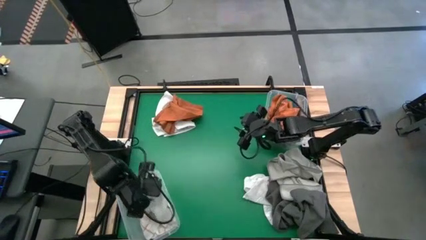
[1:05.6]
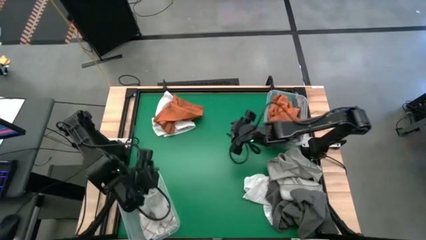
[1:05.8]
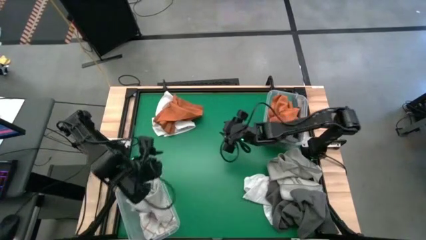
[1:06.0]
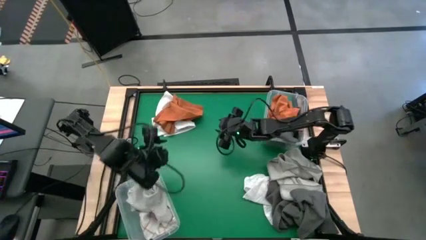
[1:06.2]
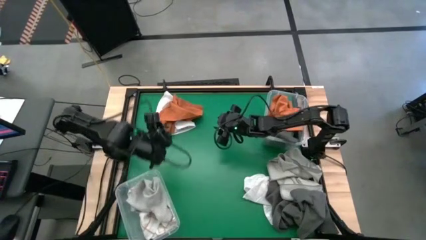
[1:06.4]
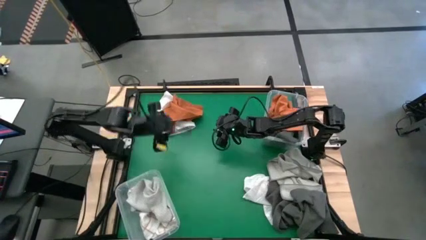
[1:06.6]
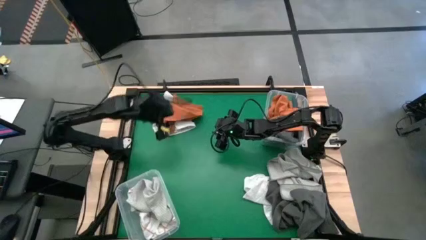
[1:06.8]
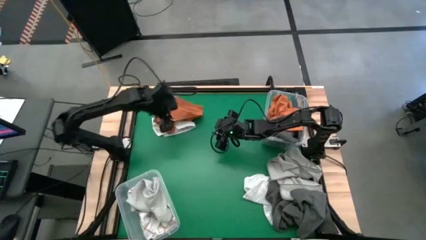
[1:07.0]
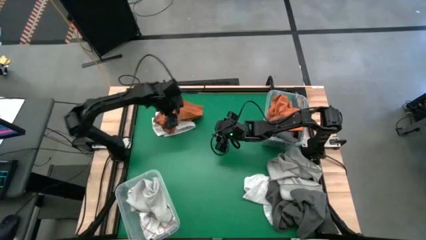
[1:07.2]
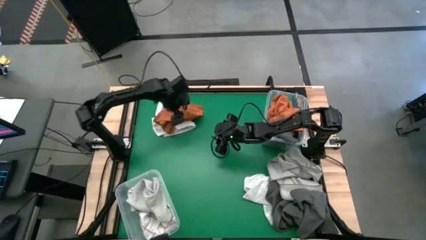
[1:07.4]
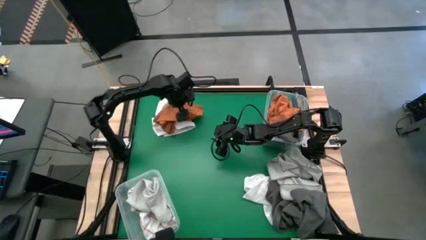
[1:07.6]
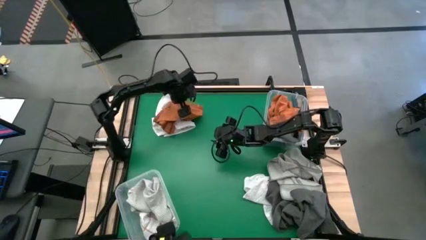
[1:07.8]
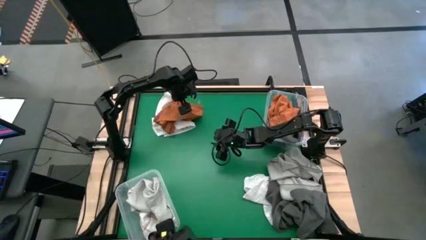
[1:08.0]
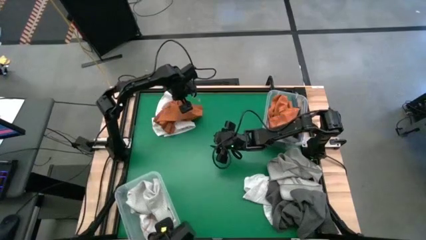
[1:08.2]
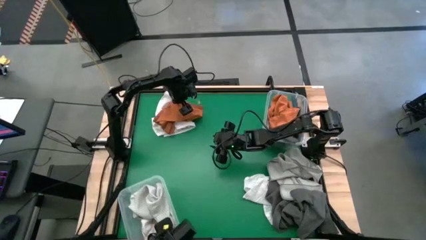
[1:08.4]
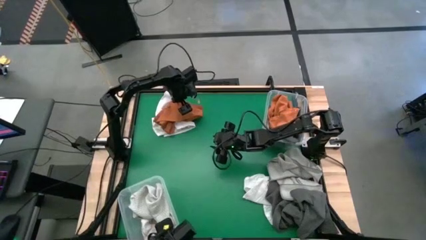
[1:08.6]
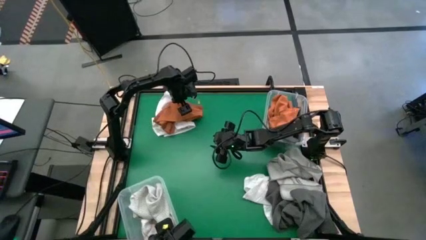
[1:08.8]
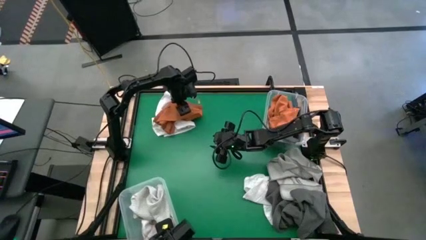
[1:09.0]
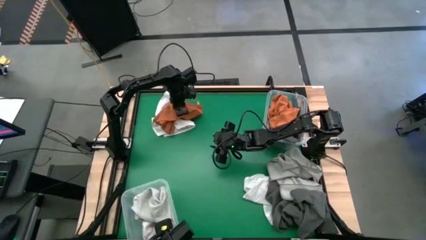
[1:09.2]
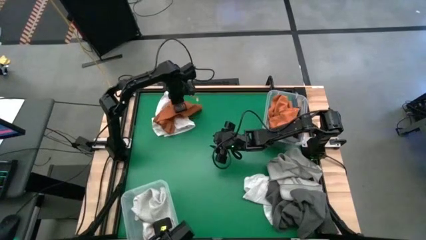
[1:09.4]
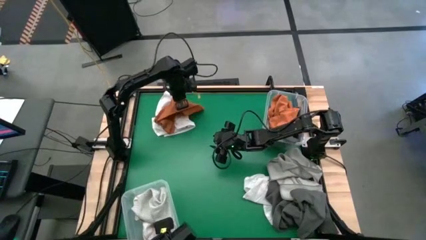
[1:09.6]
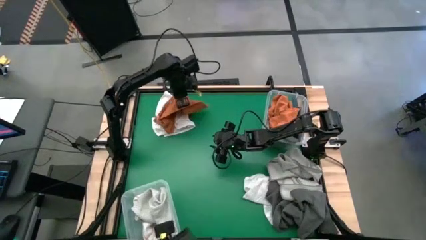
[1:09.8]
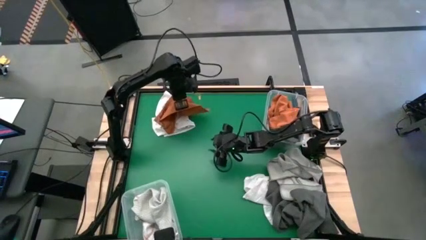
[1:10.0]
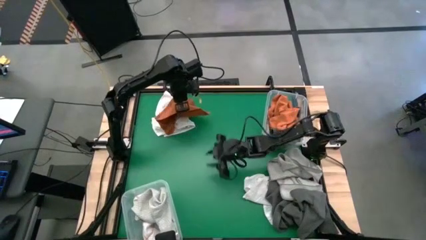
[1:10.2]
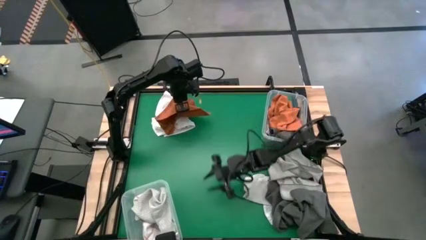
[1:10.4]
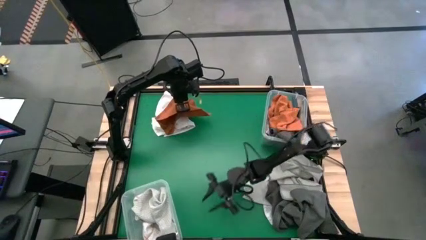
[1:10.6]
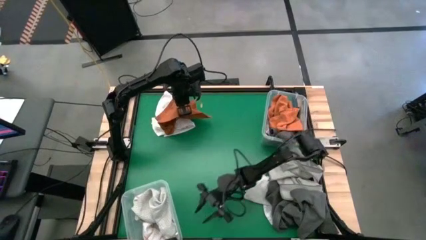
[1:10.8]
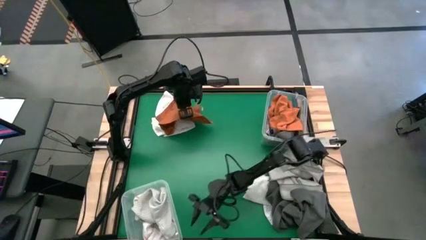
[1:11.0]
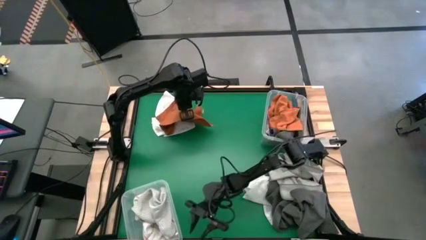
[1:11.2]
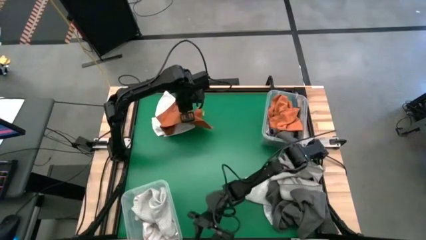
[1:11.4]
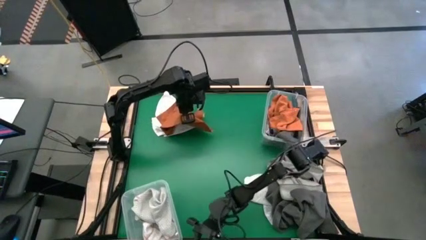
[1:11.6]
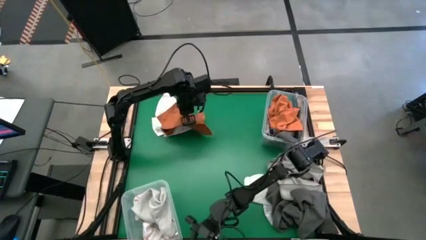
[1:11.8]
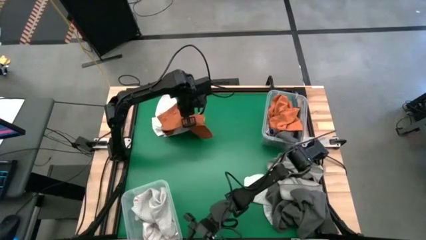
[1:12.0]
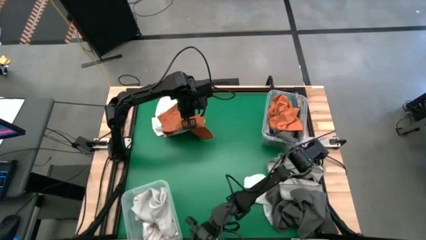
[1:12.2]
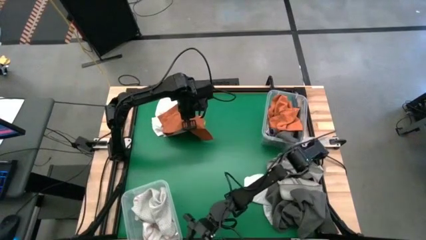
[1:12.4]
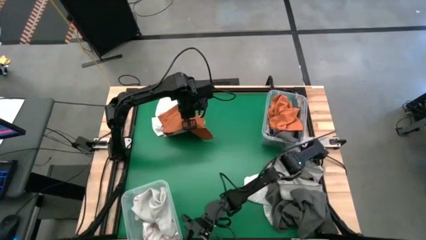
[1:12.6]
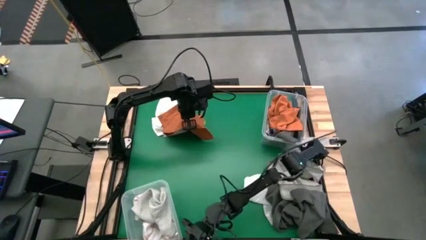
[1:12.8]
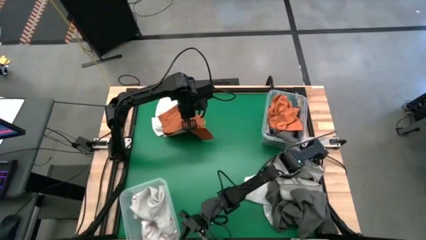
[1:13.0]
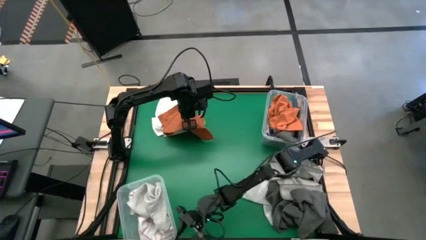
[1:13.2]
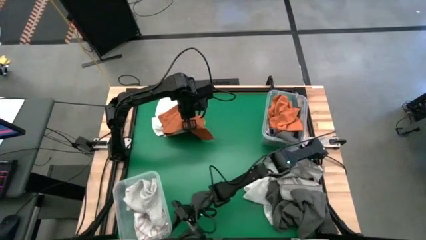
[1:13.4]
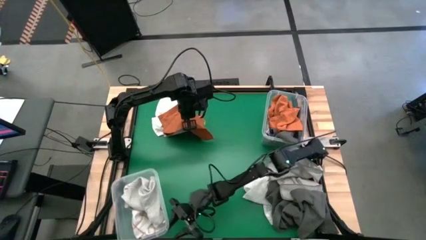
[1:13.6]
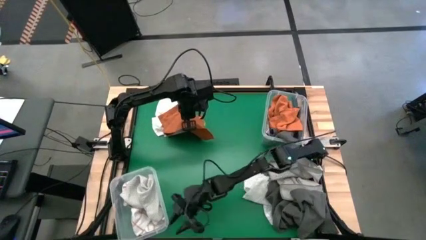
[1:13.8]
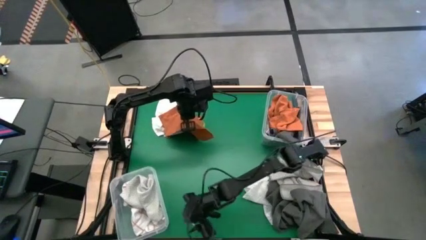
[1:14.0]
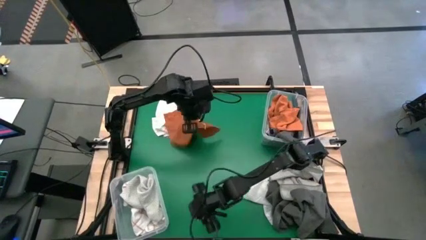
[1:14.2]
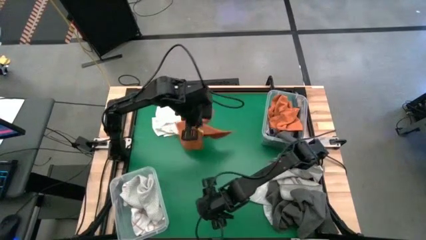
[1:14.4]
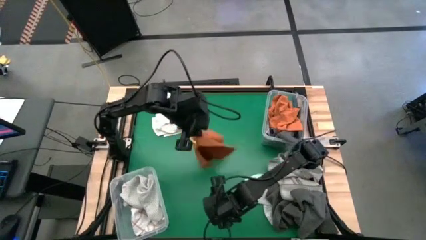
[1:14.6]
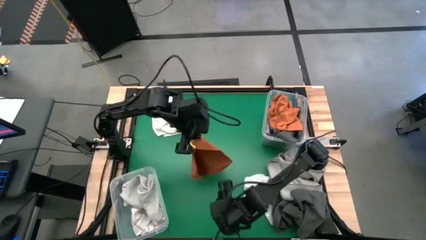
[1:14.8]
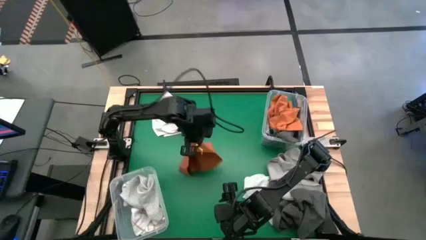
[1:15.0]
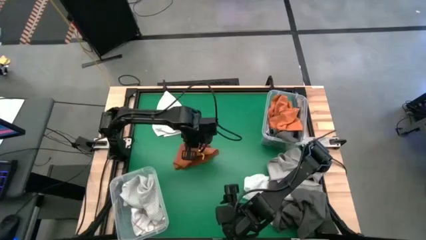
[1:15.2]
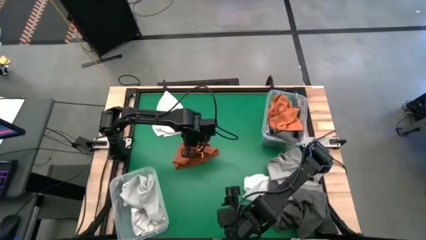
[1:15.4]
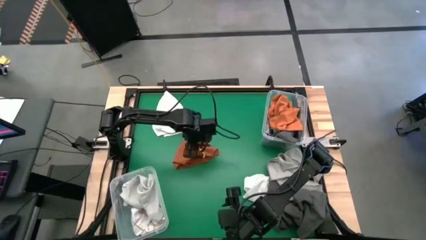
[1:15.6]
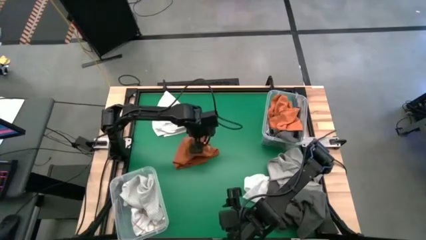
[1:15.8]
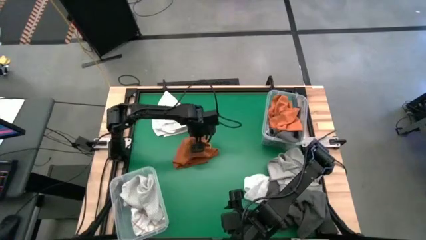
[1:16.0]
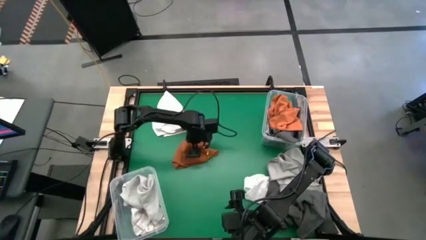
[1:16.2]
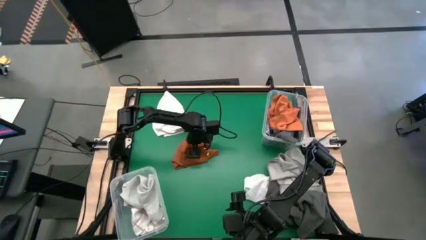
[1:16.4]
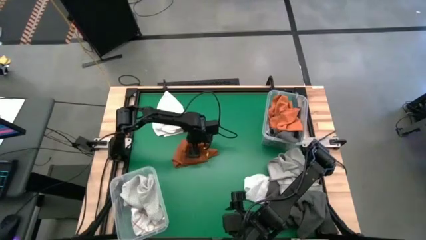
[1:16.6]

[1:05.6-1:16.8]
Task: Sort towels by color in basket
Put the orange microfiber towel into the top transparent bin
